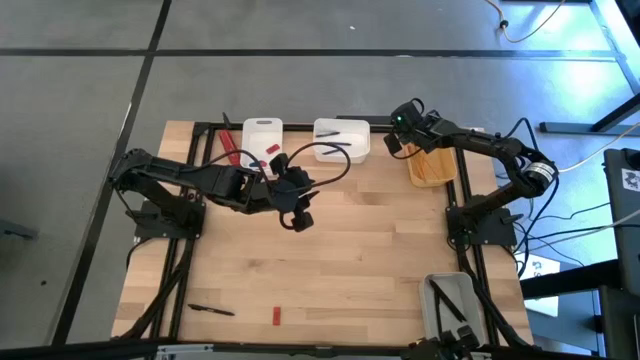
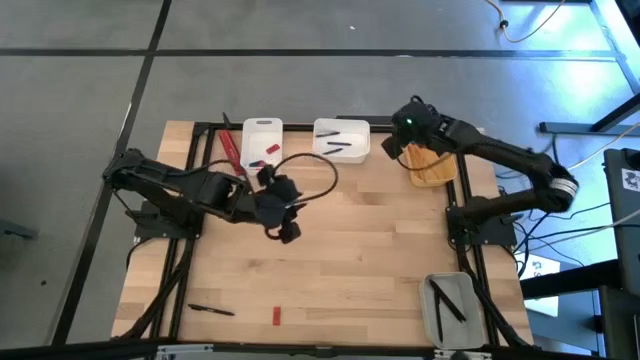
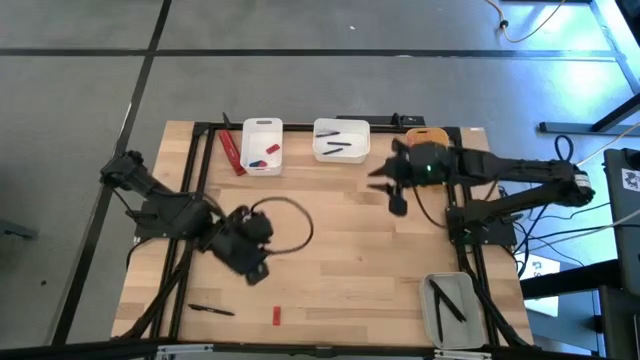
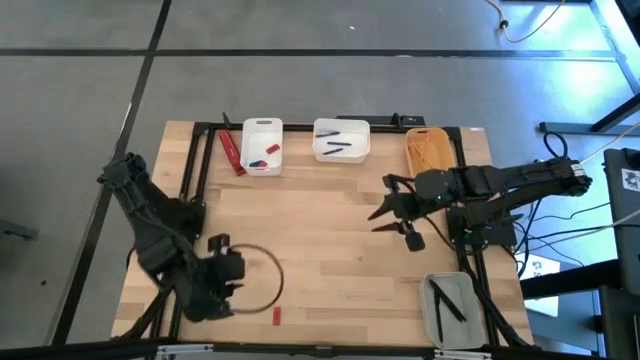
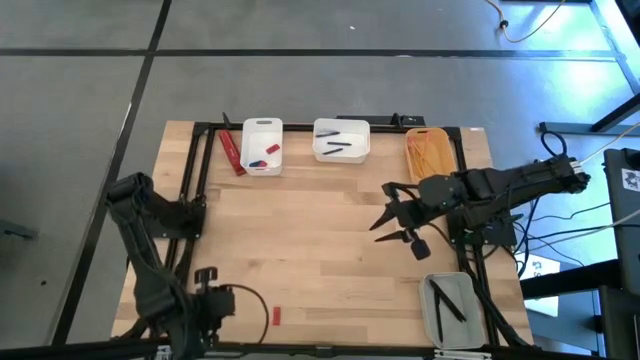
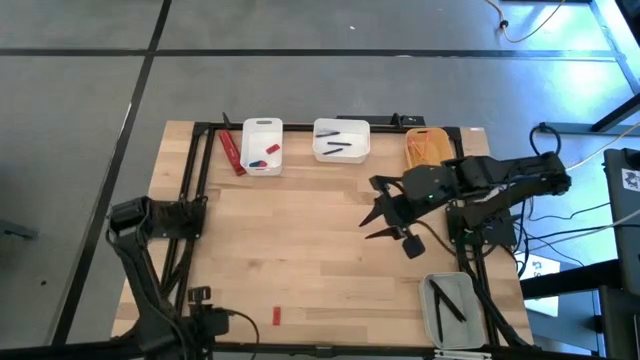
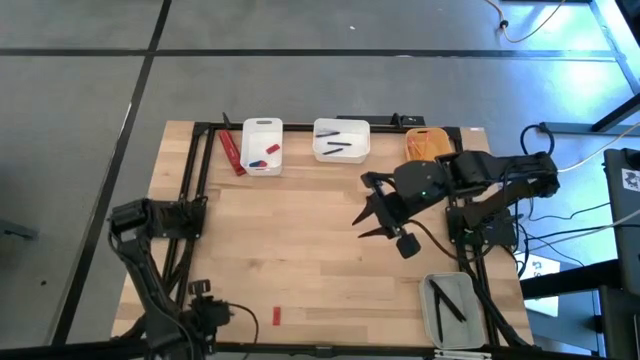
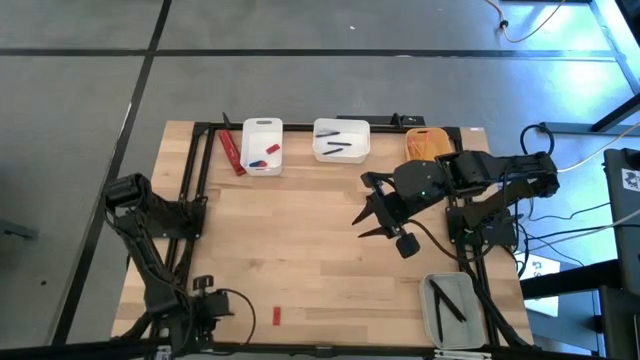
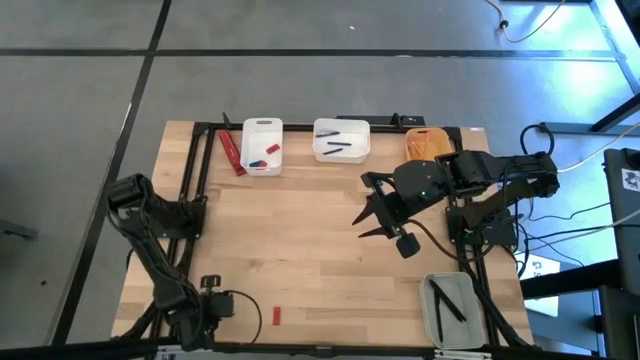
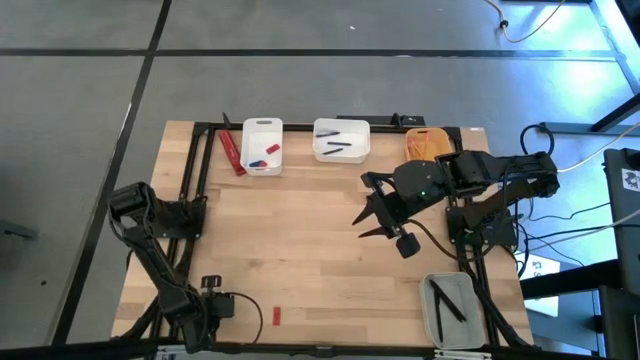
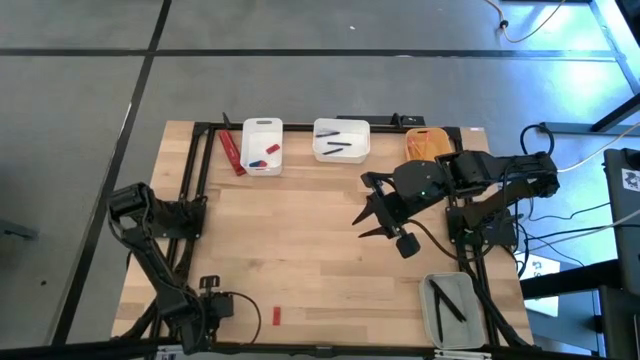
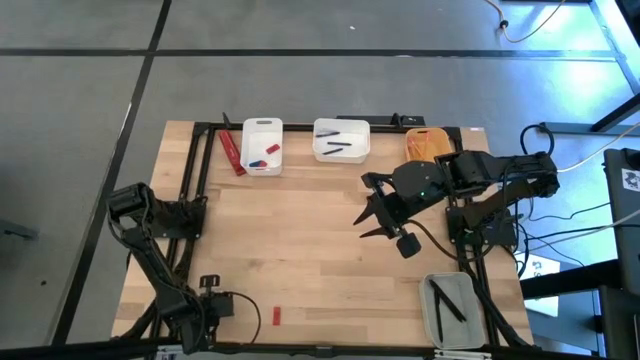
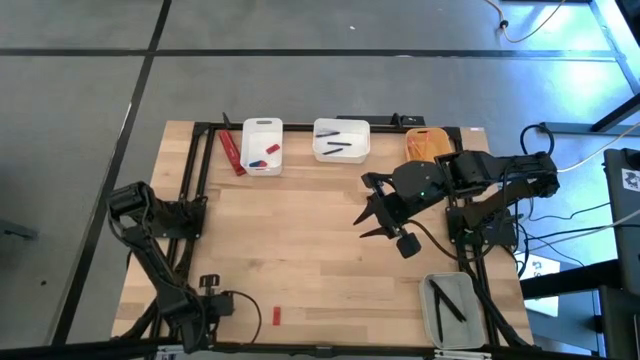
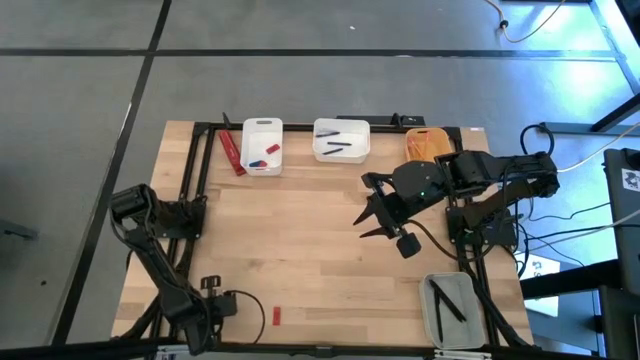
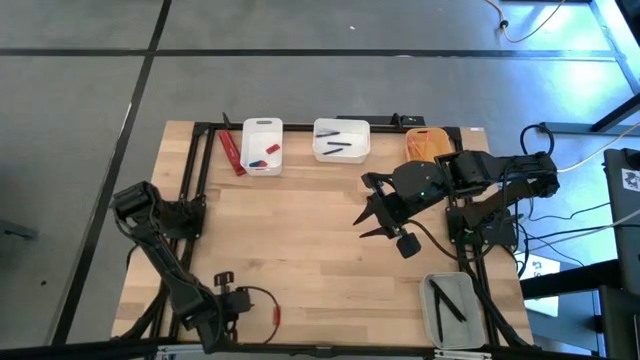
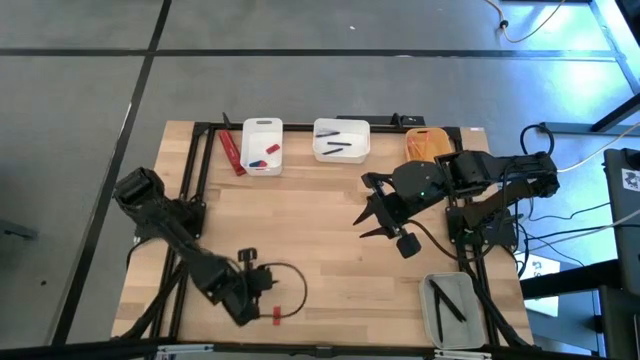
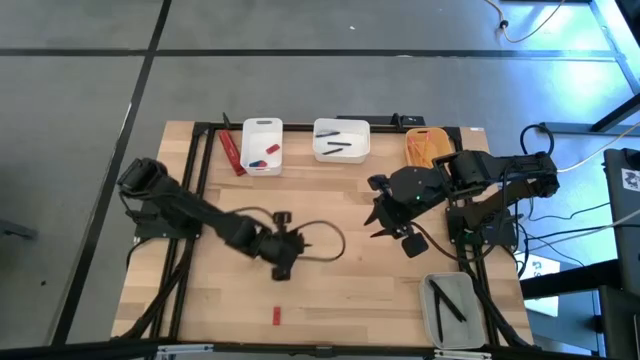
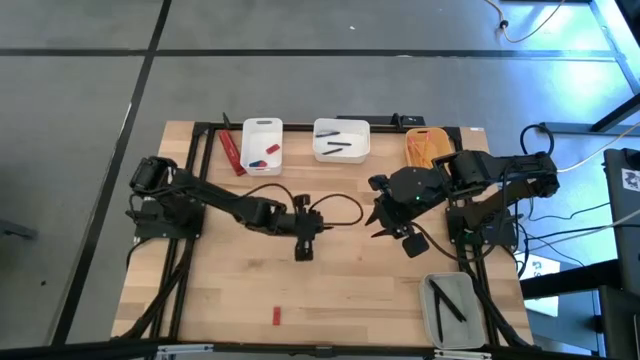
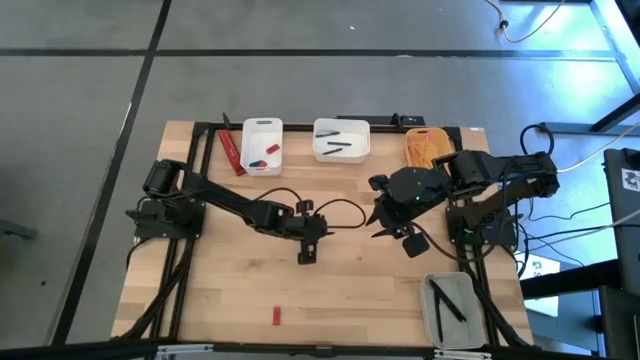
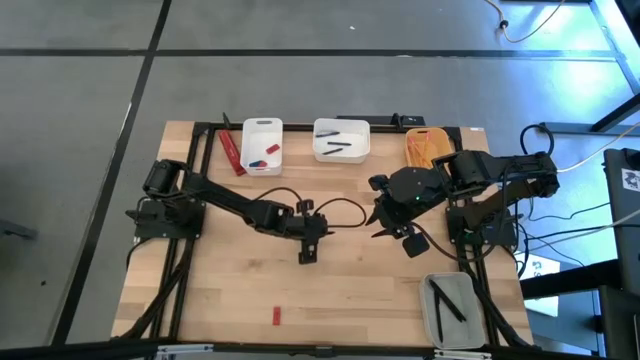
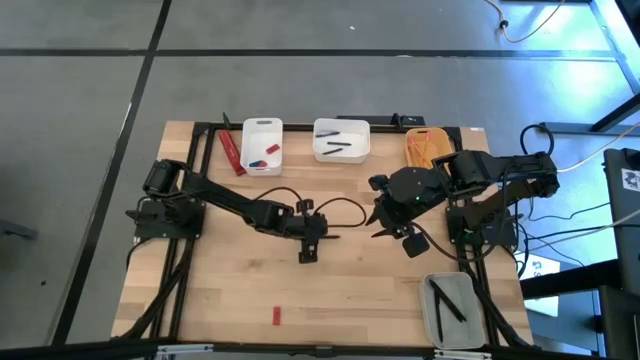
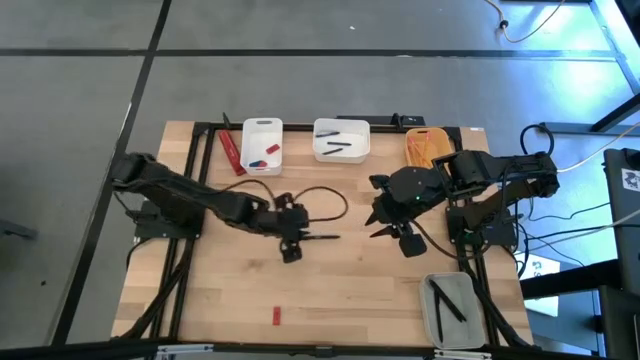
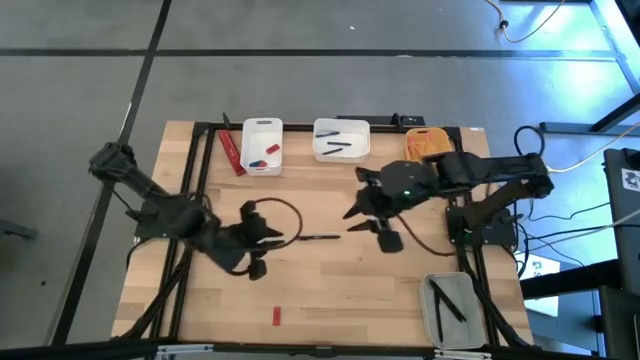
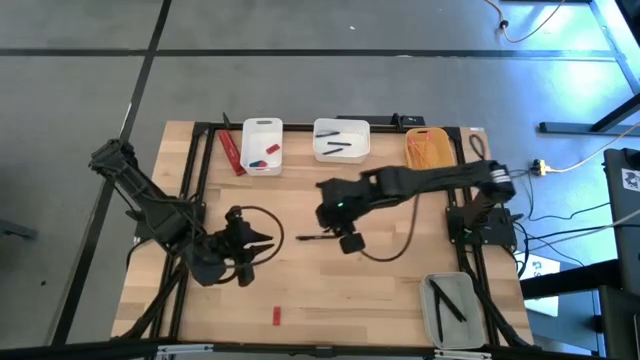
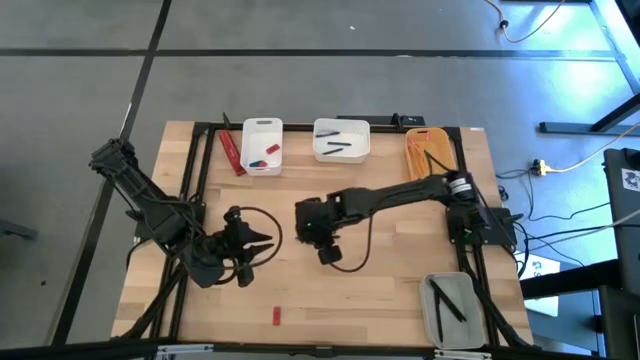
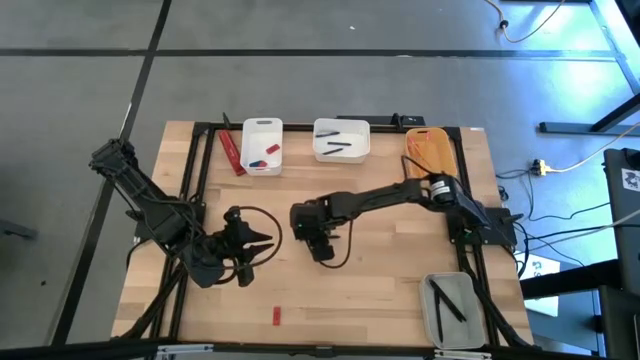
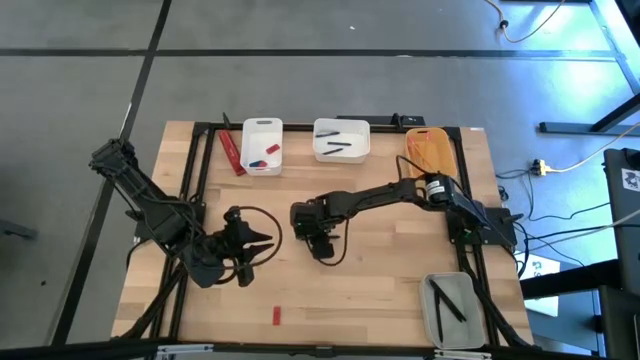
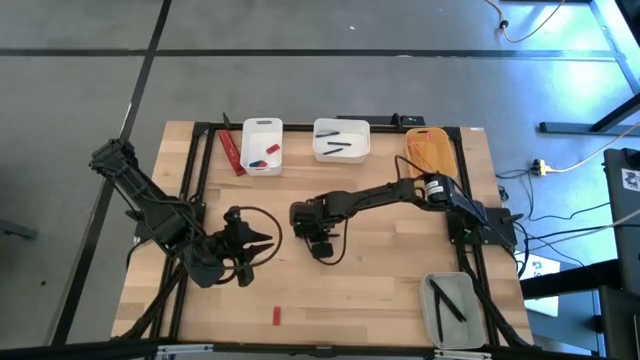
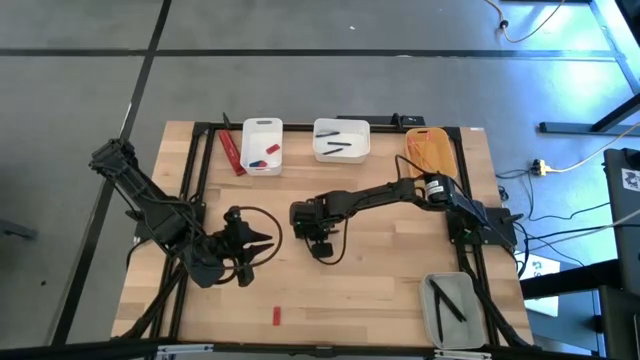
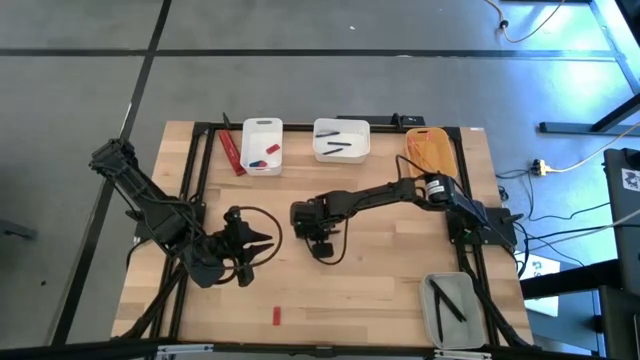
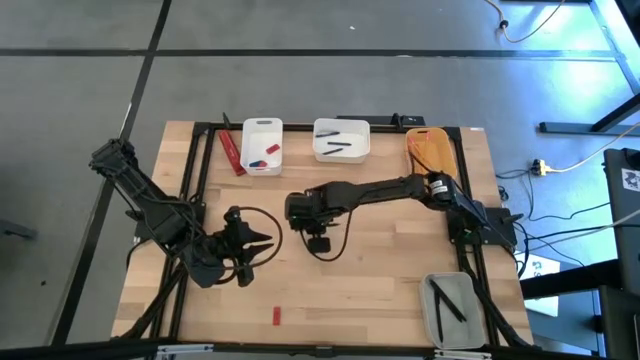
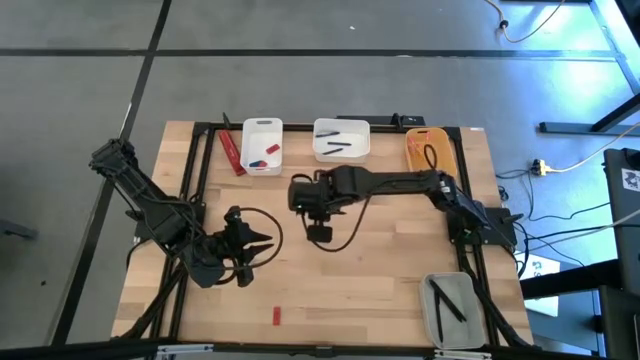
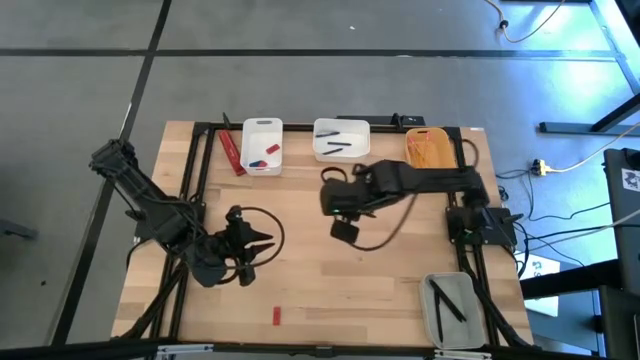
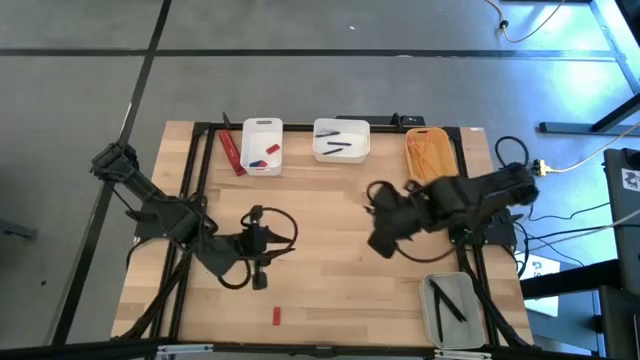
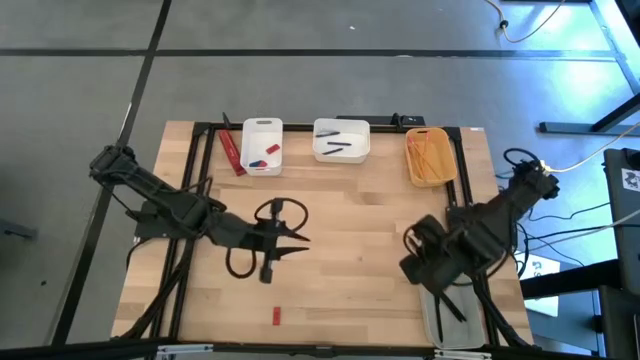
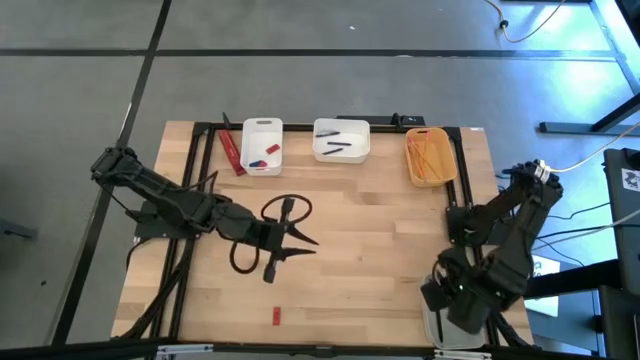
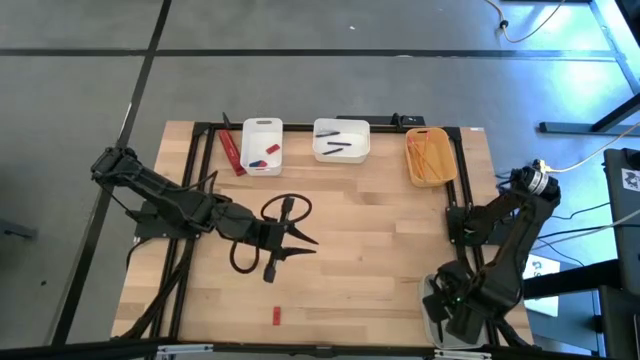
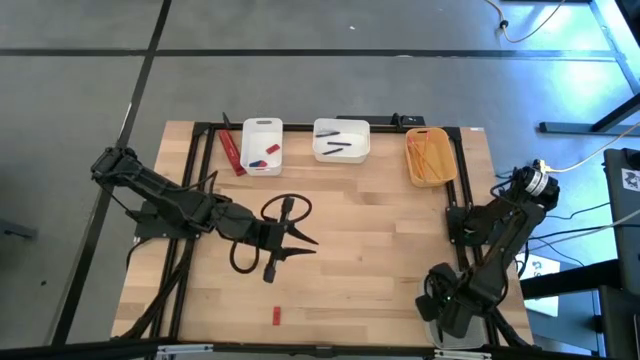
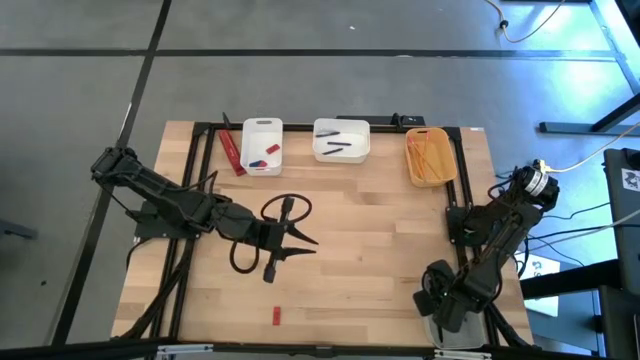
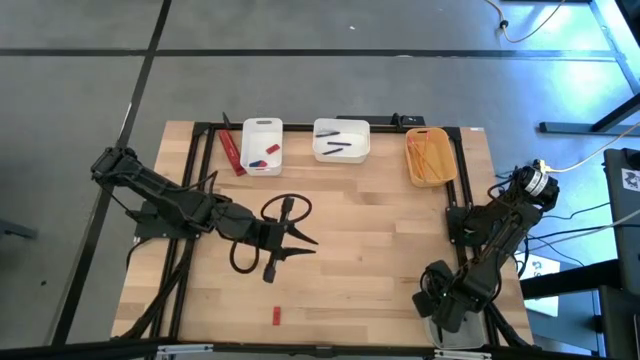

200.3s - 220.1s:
Task: Sort crayons/erasers/pens/pencils in bins
Put the black pen into the gray bin

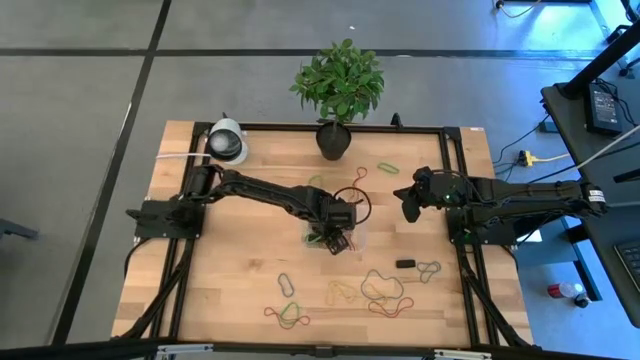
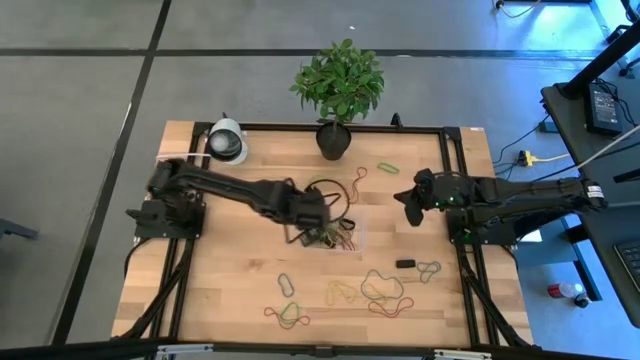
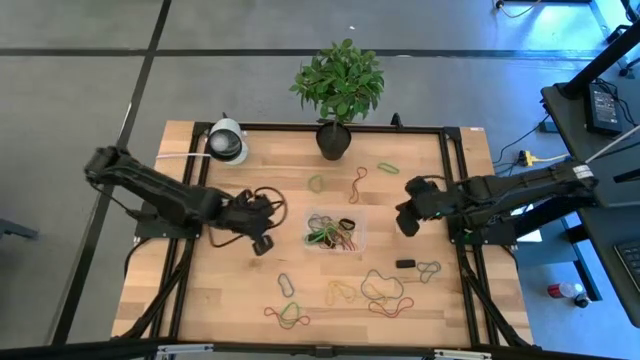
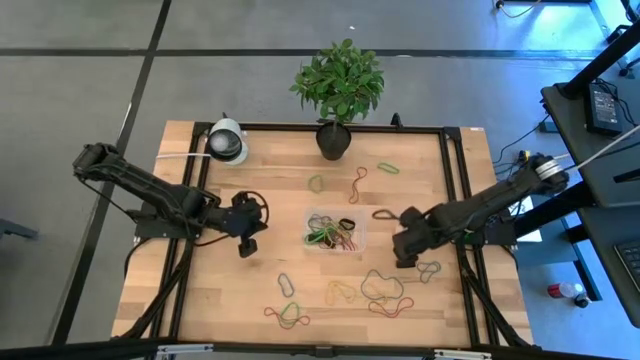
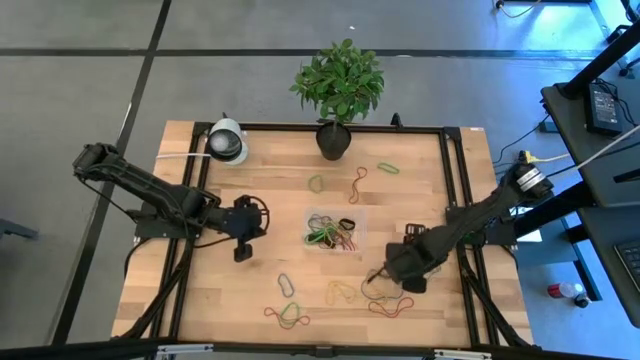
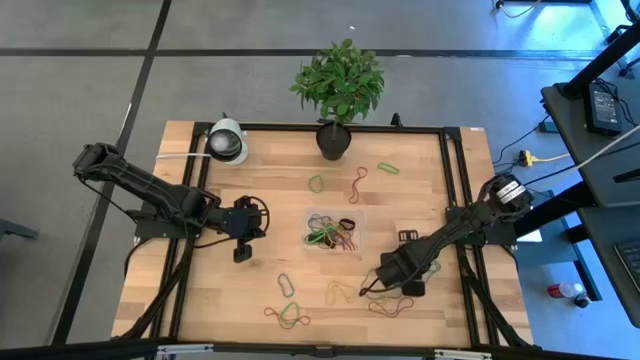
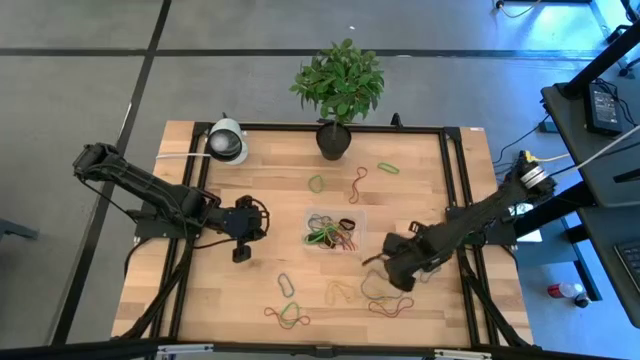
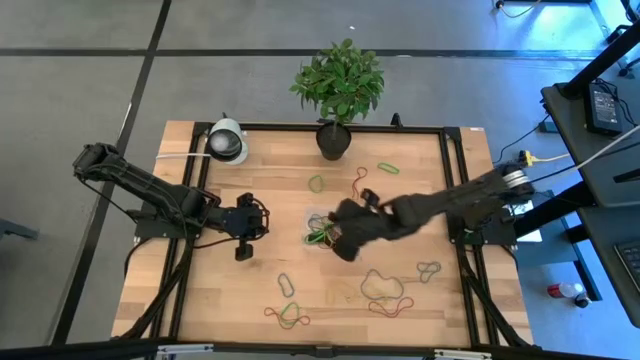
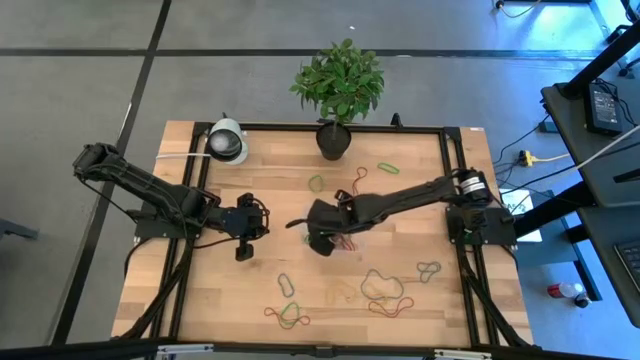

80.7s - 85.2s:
Task: Pick and place rubber bands into bin
Put the black rubber band into the bin
